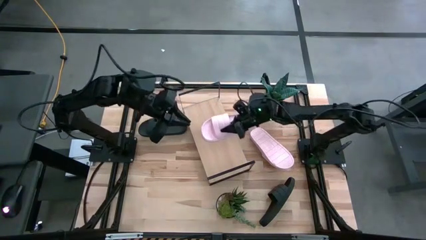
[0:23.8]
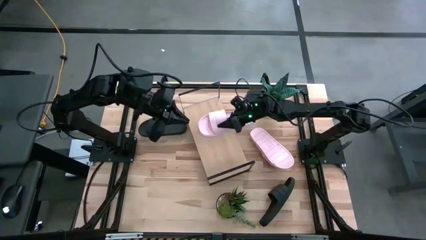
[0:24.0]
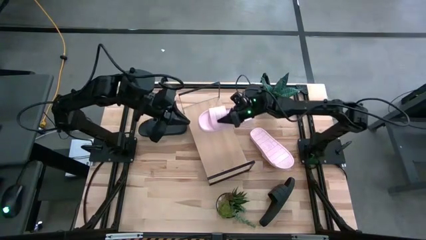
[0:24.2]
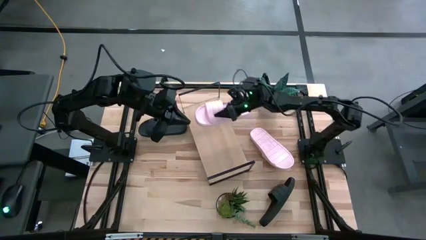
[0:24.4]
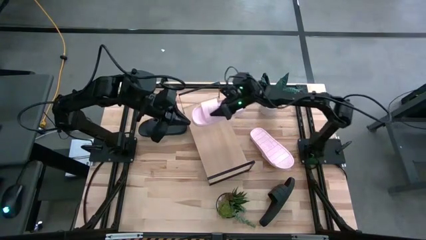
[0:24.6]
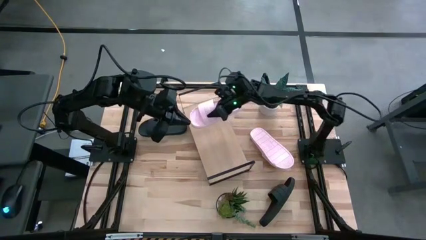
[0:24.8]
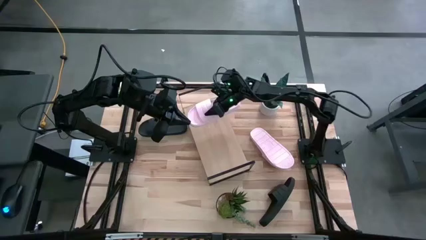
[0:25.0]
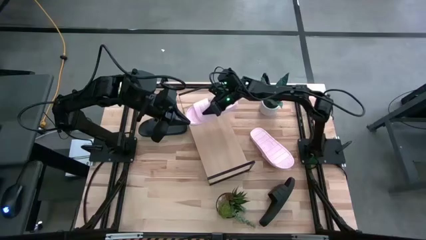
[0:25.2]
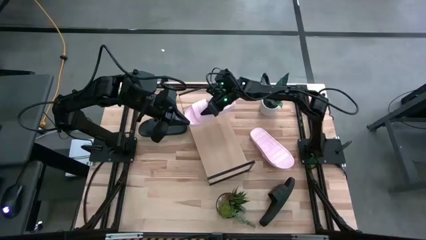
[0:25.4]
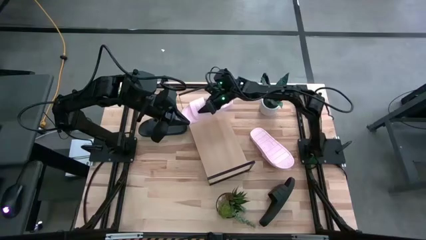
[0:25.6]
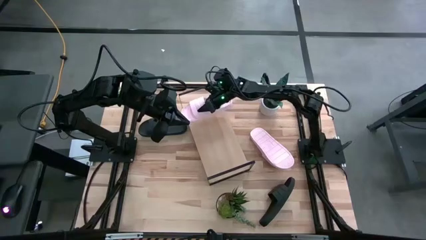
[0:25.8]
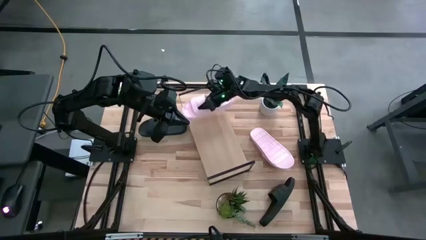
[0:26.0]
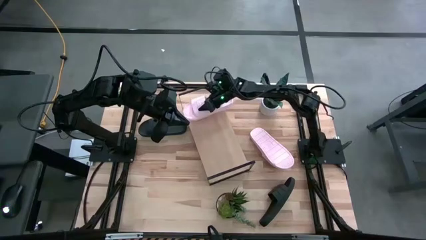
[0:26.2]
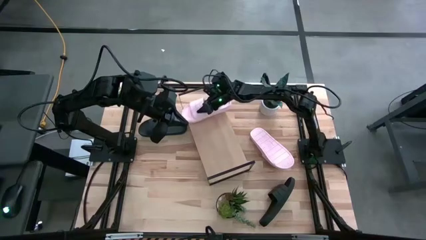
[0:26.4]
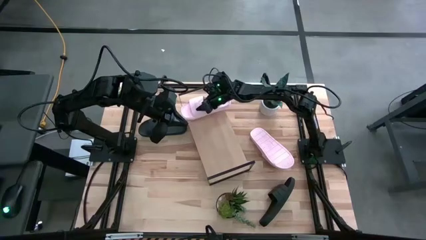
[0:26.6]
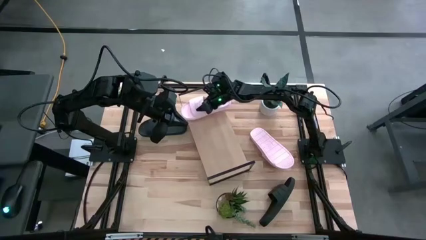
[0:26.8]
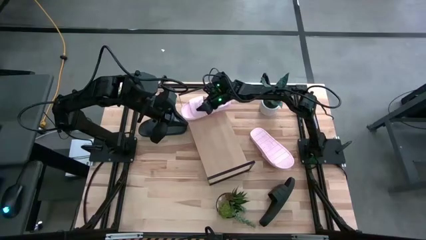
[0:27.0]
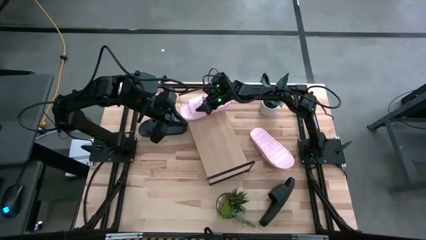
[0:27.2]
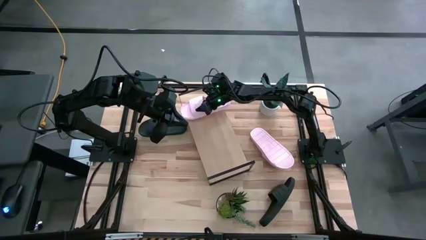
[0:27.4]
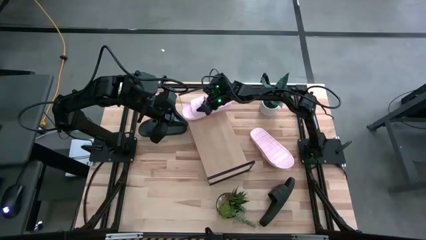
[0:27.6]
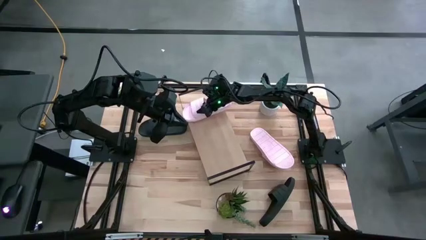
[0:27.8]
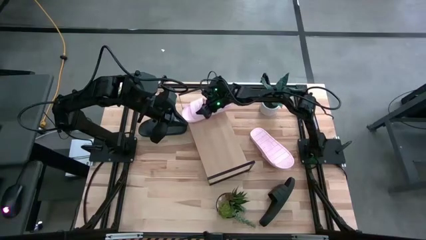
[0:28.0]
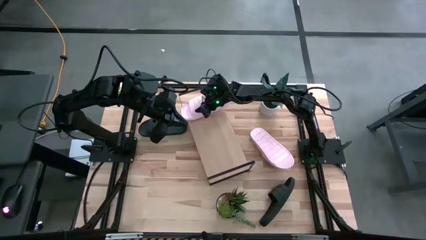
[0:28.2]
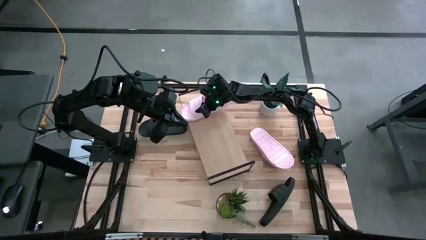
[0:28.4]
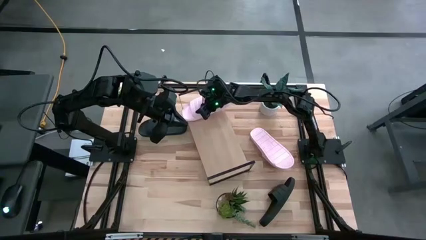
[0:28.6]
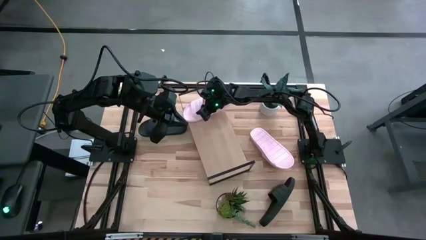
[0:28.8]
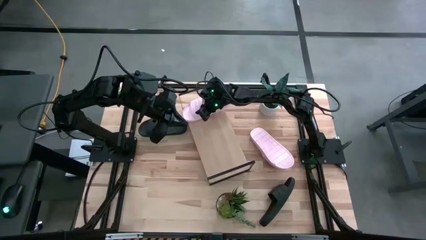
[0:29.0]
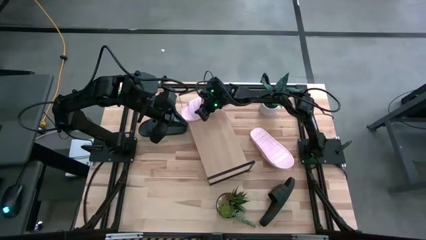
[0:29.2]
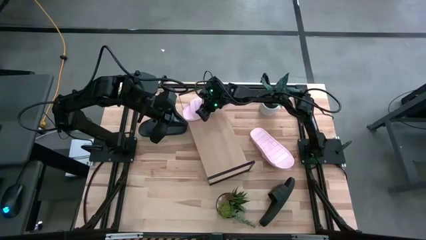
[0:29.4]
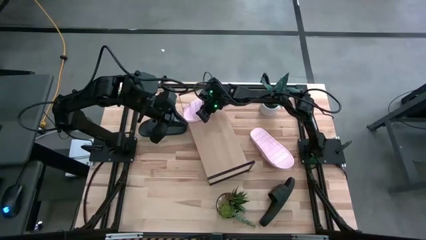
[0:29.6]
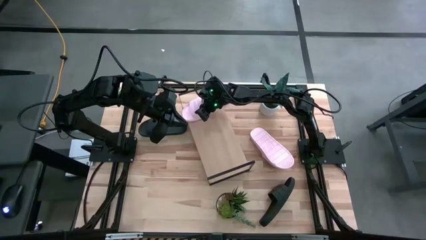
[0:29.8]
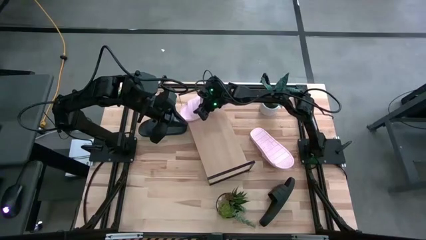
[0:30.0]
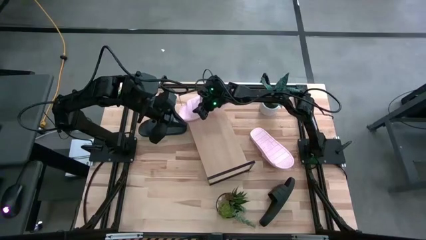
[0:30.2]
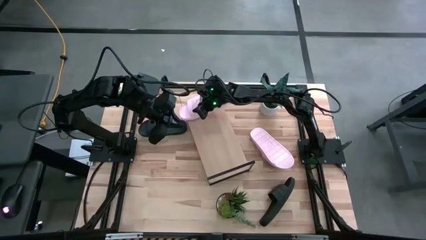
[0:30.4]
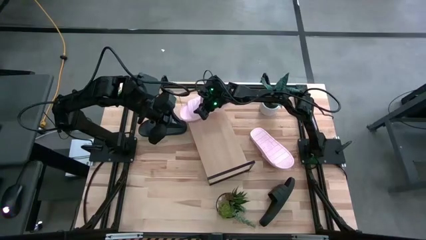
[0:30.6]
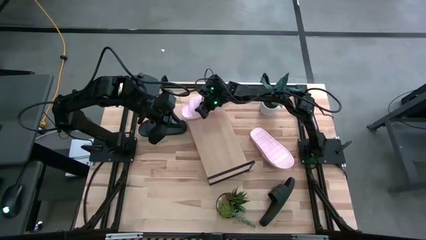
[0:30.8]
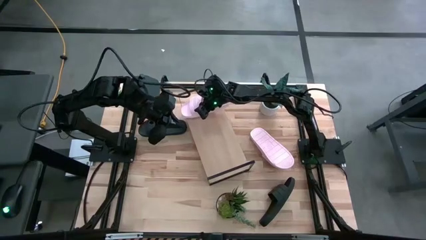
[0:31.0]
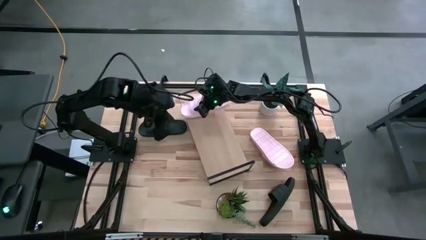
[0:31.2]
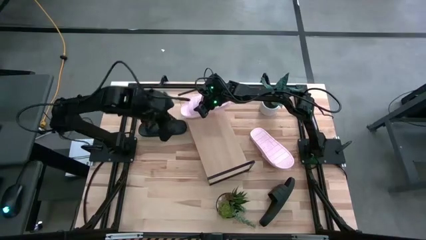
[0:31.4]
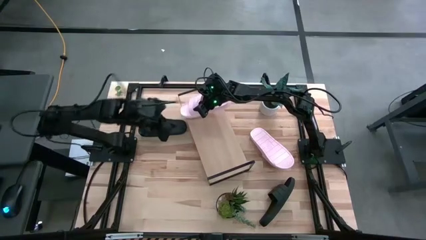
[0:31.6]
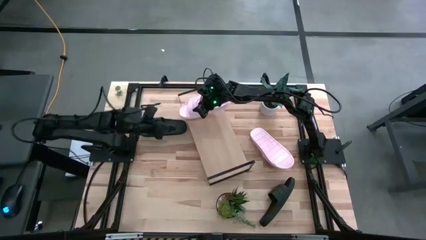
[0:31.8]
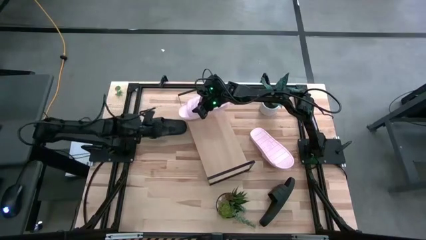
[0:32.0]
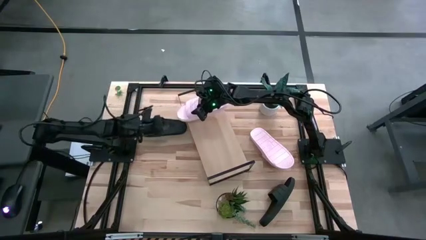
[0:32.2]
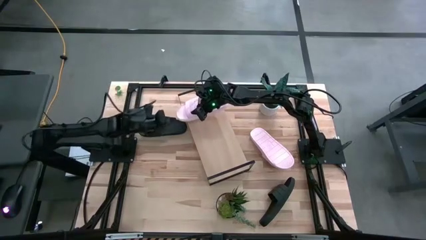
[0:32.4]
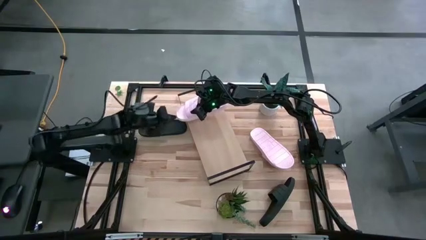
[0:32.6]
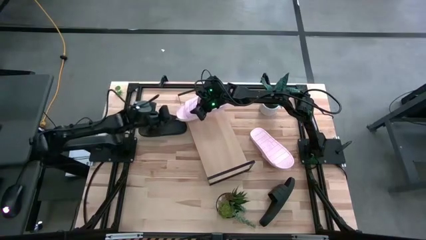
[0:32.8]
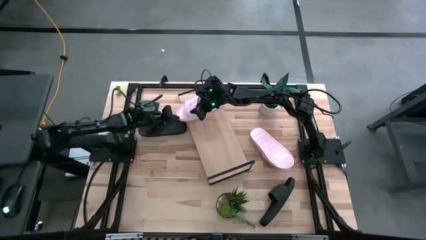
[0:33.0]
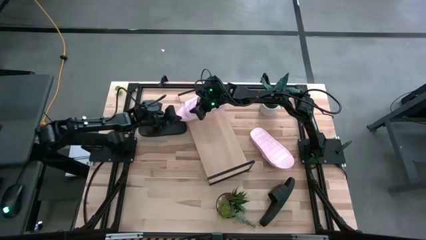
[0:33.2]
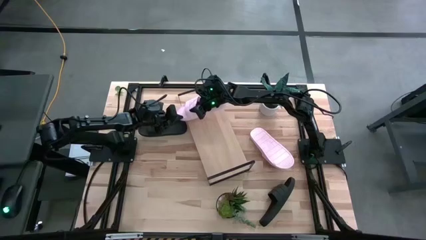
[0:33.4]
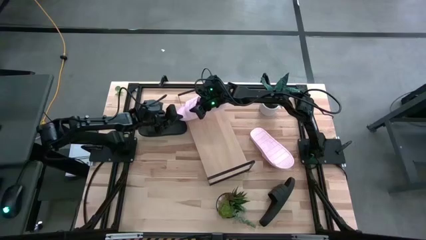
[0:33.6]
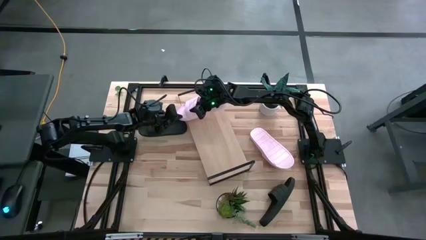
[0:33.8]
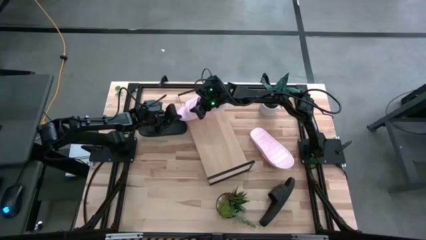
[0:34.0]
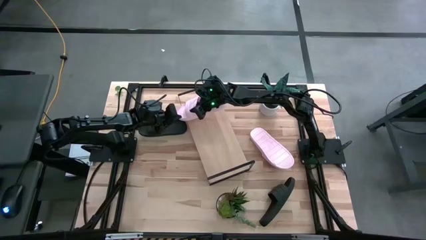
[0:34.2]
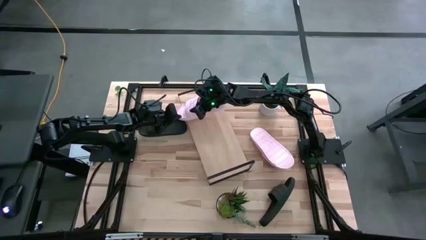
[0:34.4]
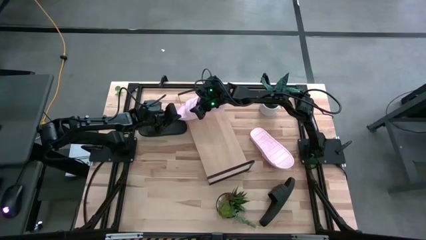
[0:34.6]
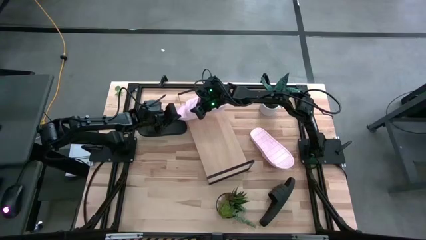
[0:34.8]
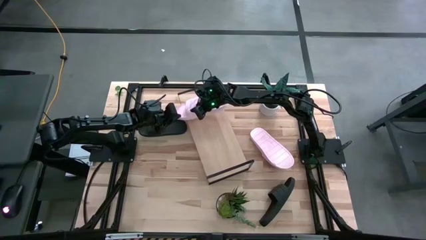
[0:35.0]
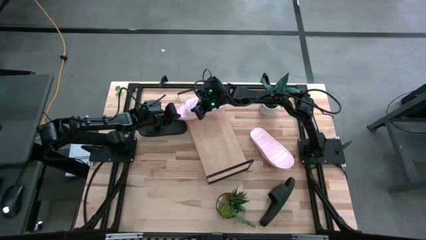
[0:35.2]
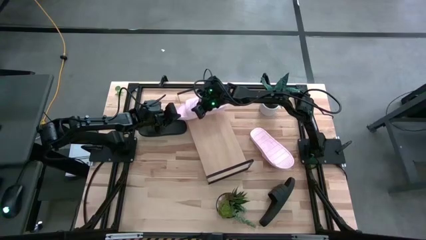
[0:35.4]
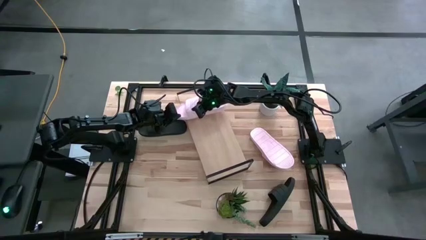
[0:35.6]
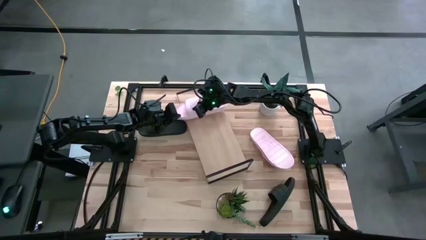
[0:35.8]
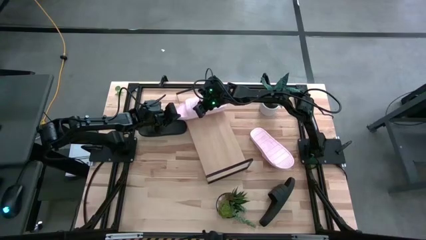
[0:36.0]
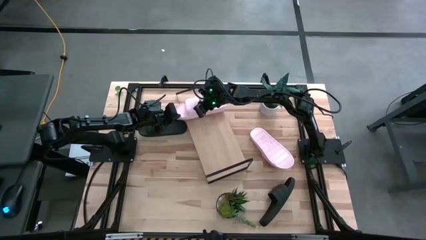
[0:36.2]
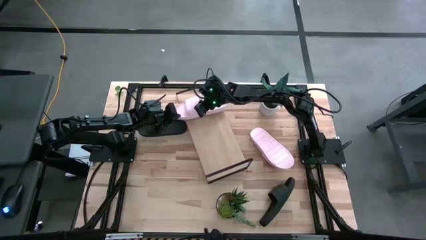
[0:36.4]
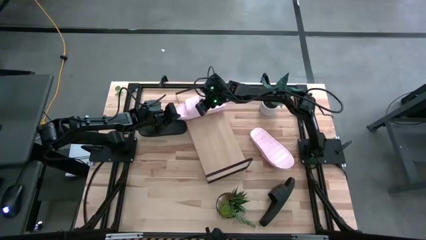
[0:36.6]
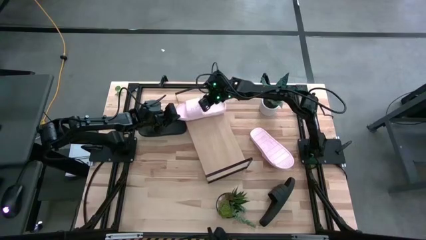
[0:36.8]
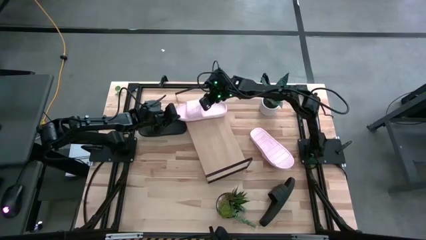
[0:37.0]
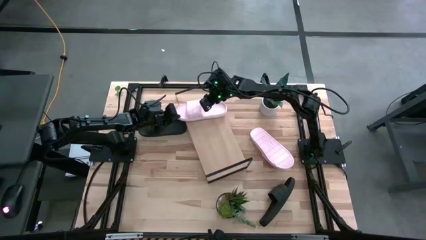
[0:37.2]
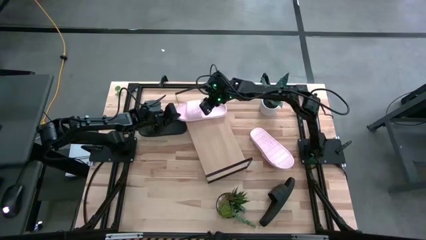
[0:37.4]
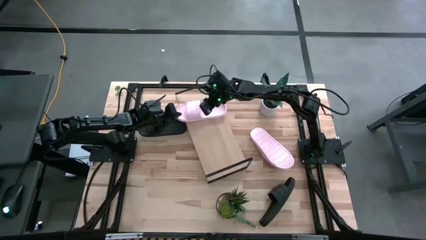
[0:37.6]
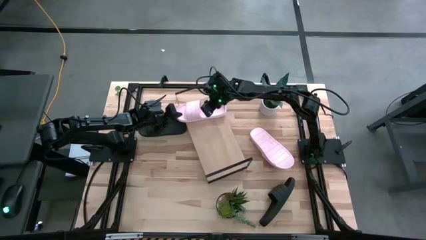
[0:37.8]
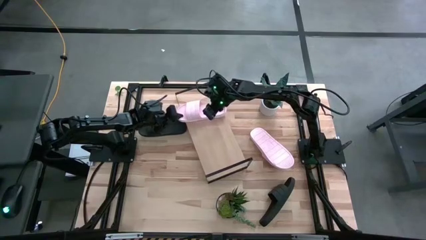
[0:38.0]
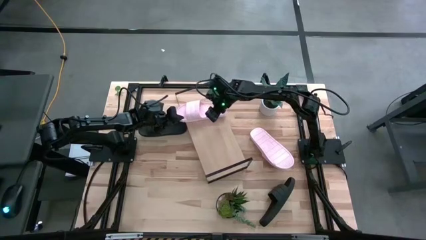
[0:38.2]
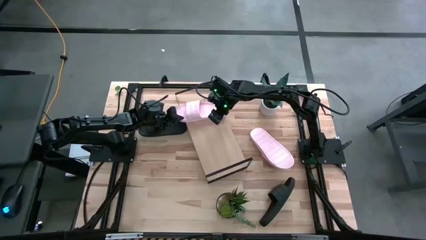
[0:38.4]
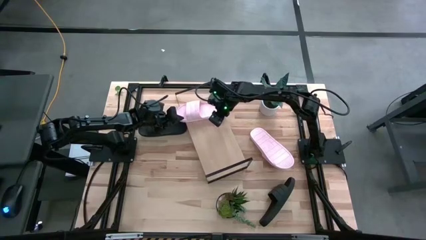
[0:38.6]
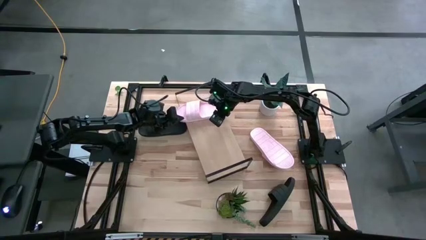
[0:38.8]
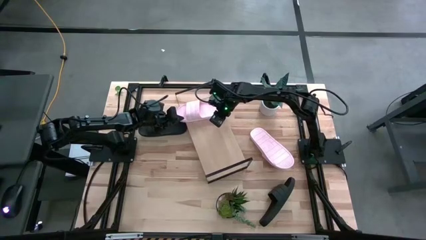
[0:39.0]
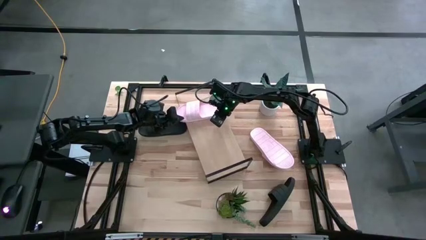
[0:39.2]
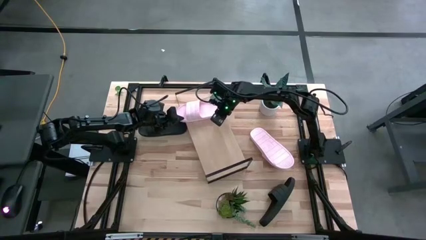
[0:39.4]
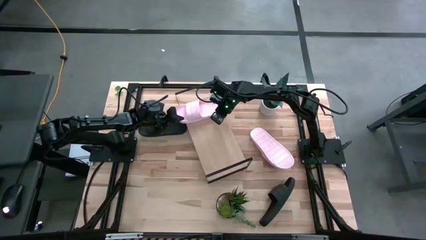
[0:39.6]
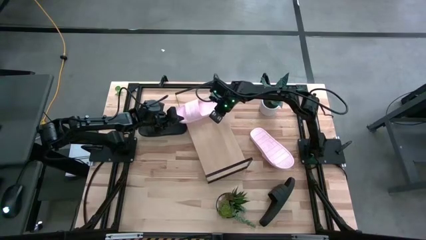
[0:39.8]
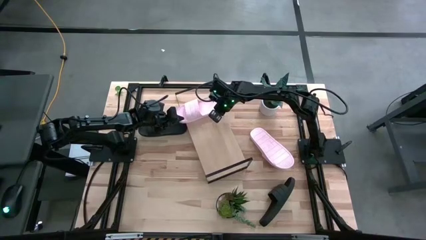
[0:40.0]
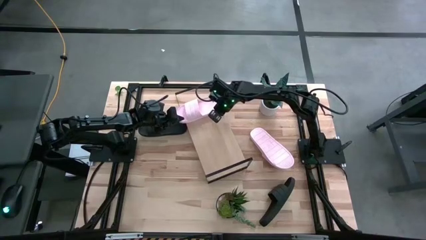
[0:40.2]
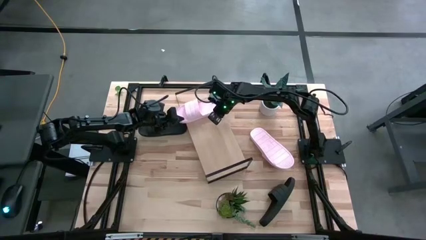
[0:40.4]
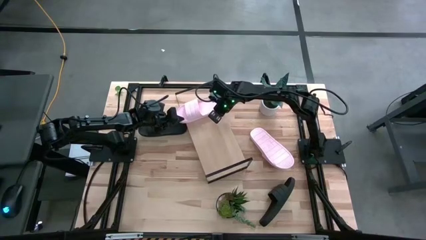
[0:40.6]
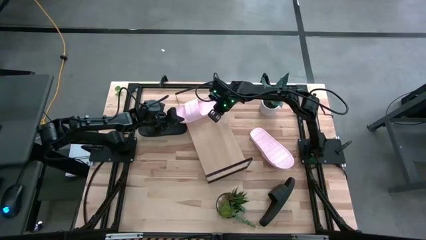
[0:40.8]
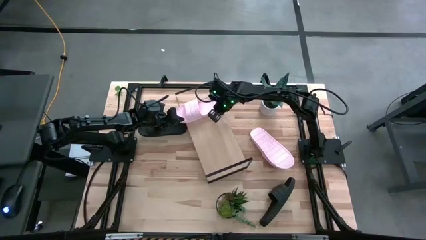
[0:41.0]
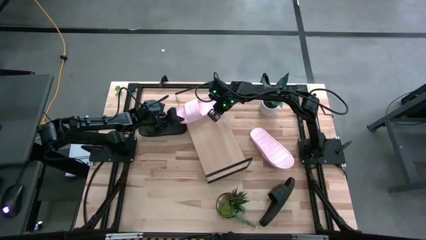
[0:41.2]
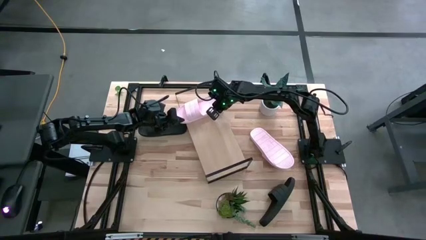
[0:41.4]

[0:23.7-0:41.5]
Task: Pick and place slides into the shelf
Put the left pink slides on the shelf
